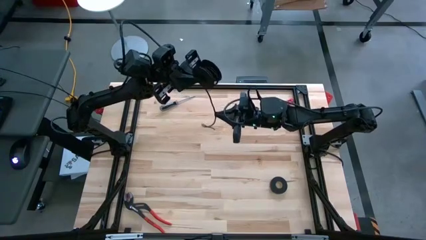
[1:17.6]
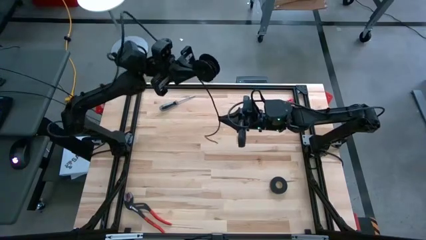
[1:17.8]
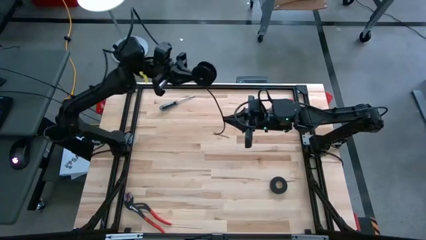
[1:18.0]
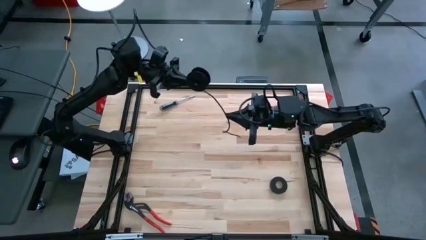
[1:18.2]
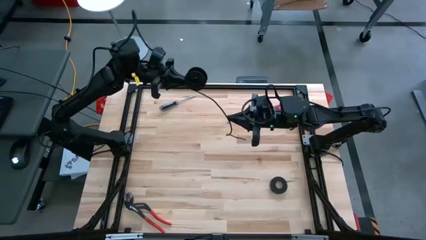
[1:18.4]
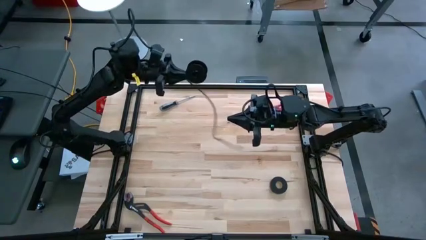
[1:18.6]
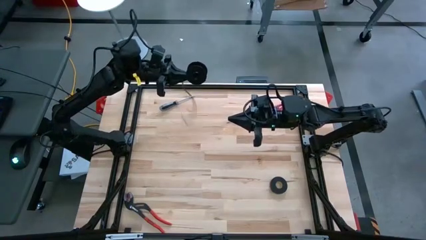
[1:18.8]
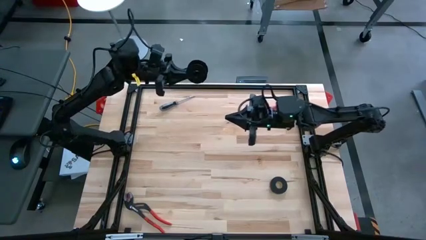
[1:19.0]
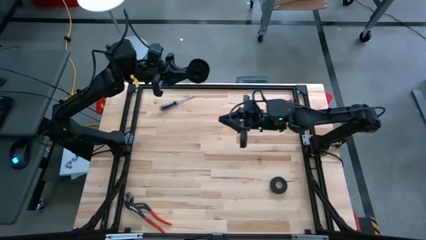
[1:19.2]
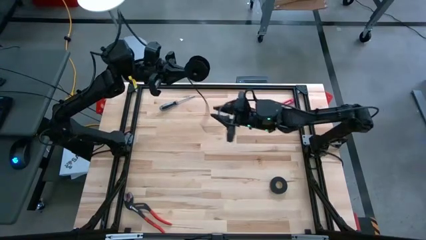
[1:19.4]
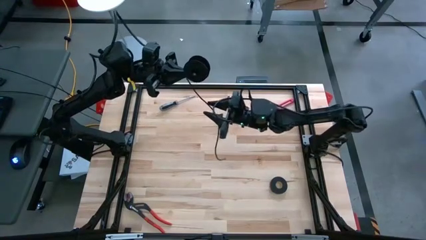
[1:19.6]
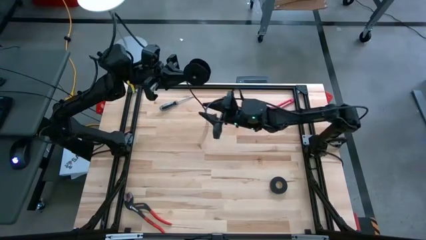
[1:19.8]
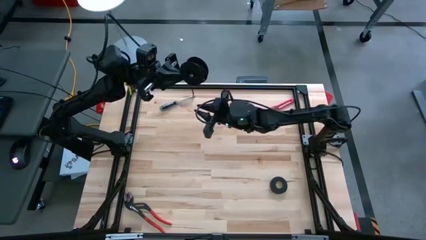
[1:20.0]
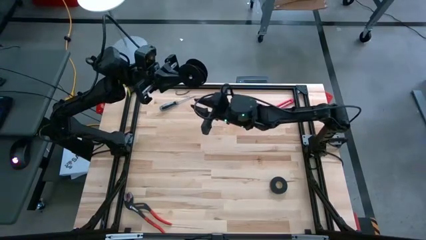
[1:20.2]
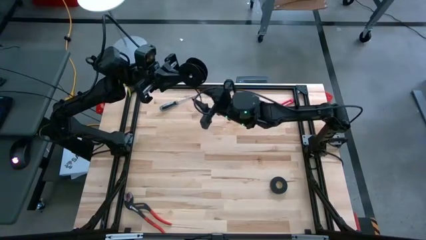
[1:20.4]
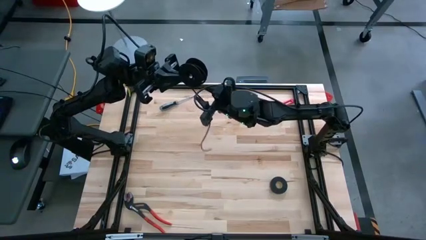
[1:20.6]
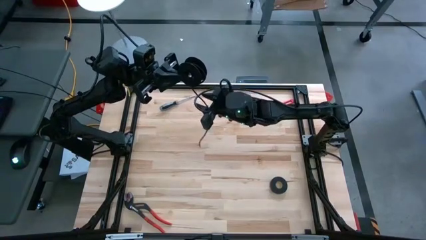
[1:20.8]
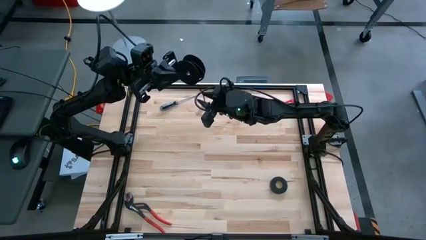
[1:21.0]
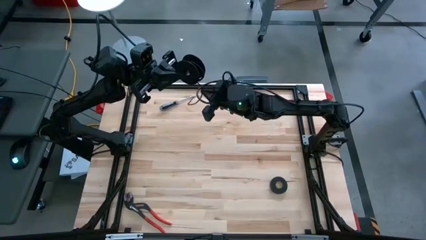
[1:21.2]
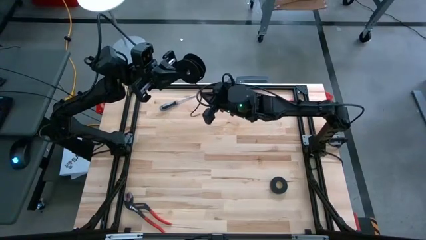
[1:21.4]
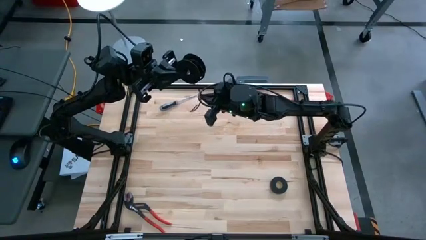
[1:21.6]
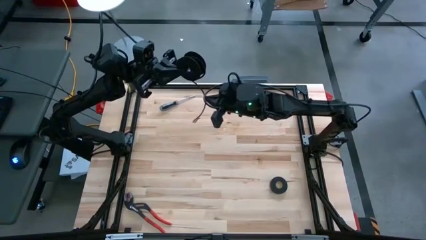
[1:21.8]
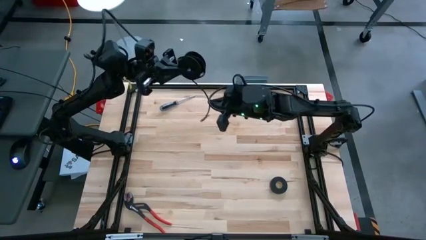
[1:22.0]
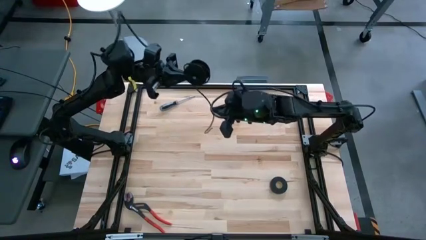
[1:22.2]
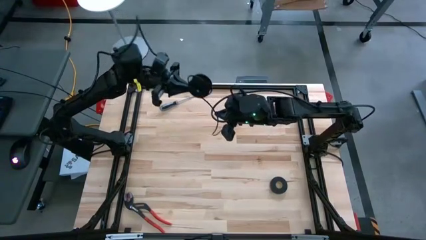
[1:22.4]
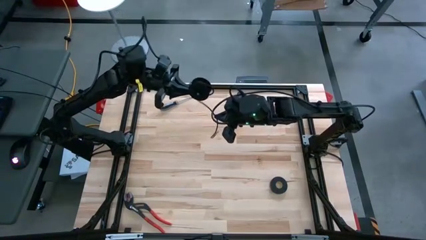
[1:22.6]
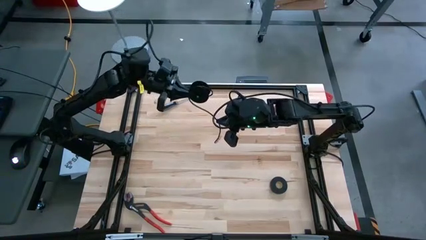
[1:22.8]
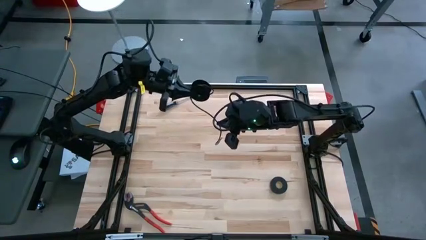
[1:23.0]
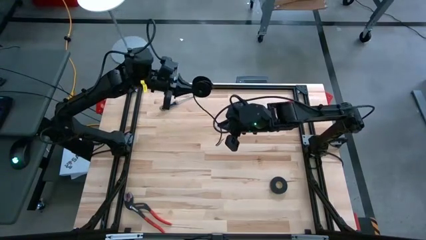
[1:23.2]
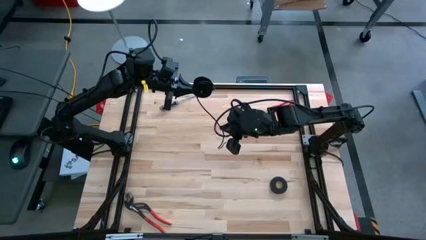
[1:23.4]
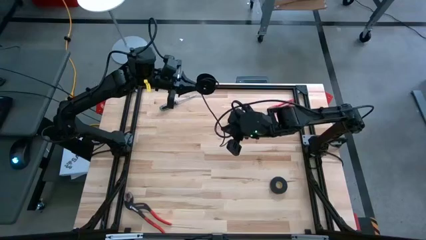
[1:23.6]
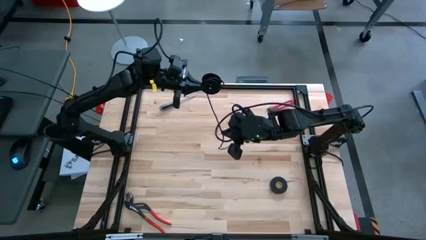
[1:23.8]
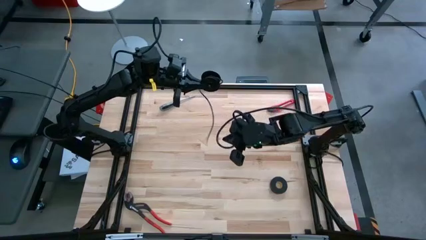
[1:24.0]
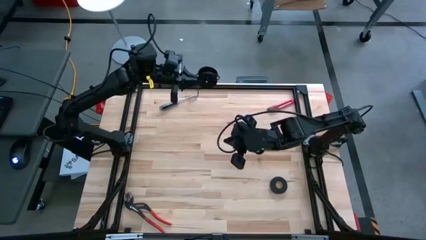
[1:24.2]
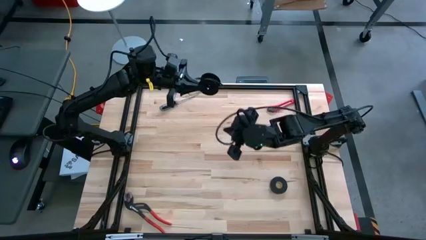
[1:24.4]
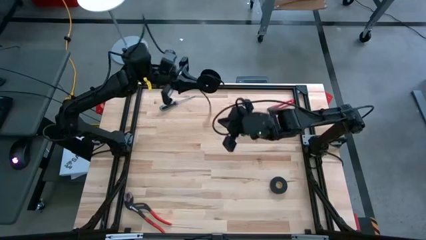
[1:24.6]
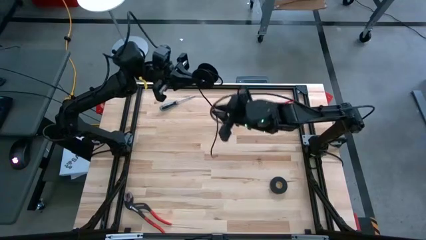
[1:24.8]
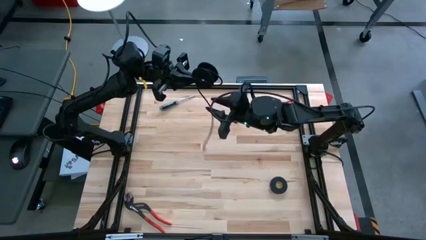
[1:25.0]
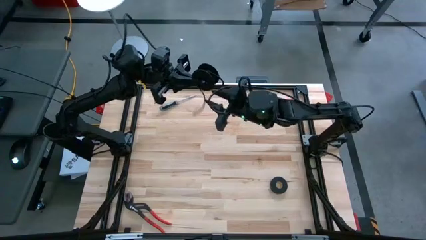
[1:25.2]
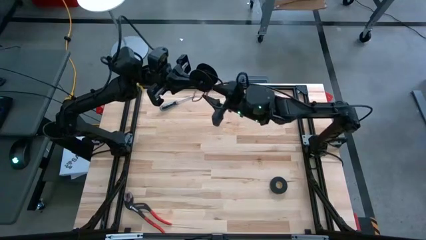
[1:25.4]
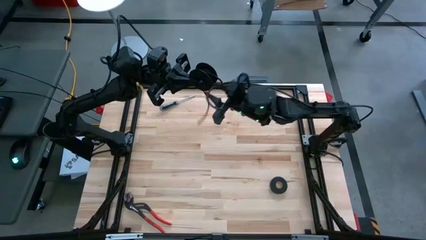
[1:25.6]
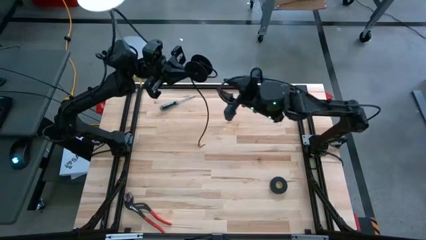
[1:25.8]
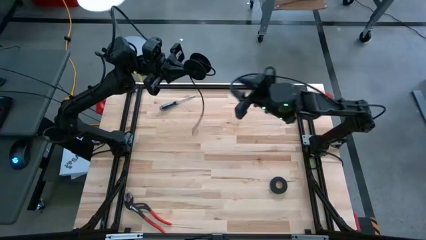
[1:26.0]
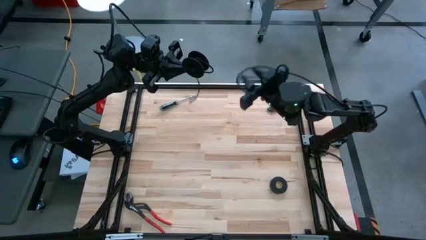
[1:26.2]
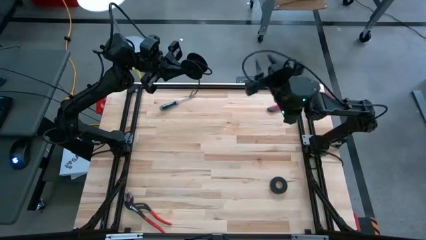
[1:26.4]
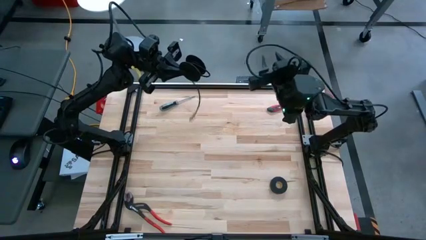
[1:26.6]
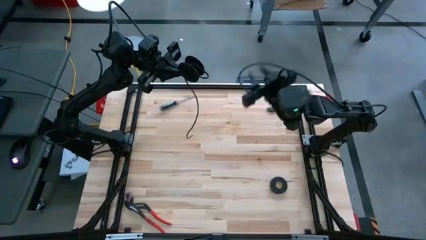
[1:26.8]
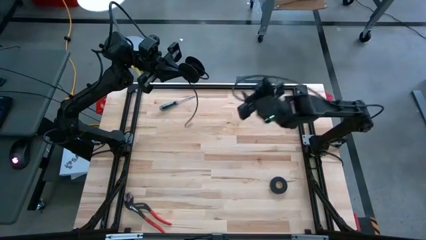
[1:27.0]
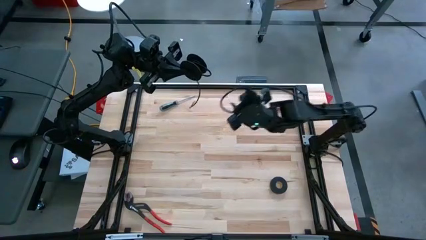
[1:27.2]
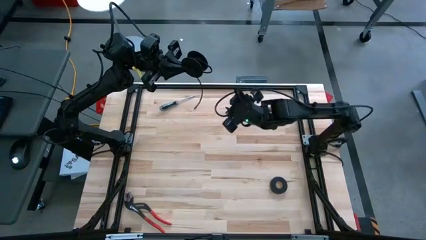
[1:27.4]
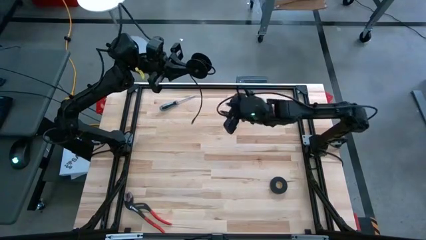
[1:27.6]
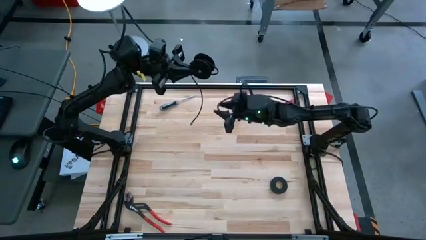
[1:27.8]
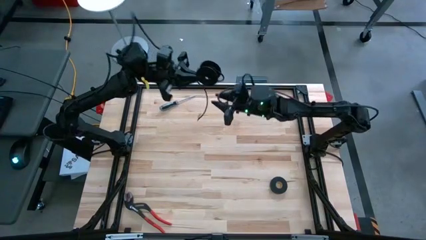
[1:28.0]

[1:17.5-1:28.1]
Task: Coil cords
Coil the black wire on the black spool

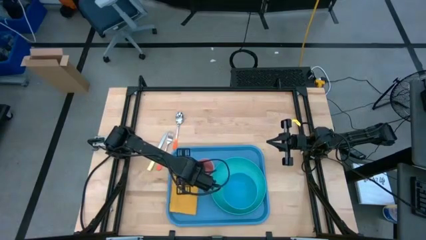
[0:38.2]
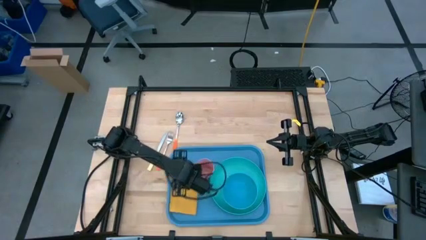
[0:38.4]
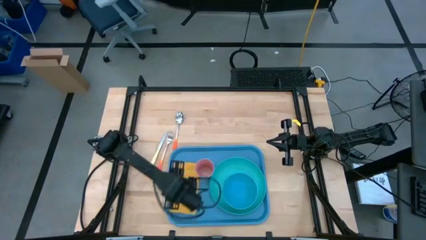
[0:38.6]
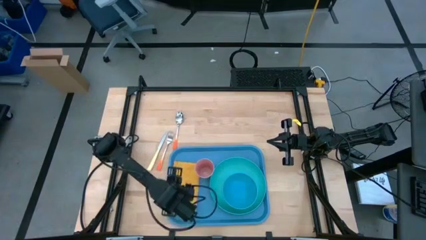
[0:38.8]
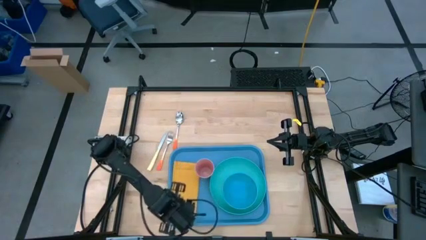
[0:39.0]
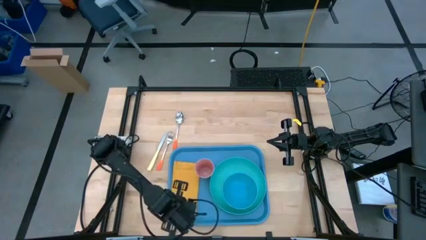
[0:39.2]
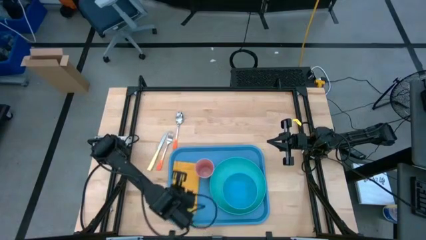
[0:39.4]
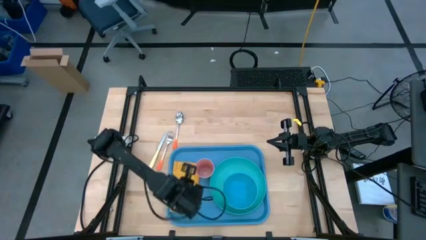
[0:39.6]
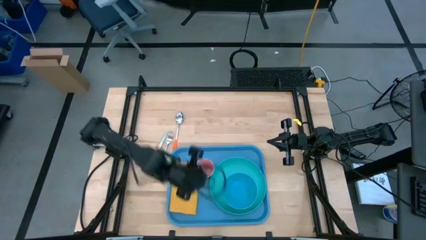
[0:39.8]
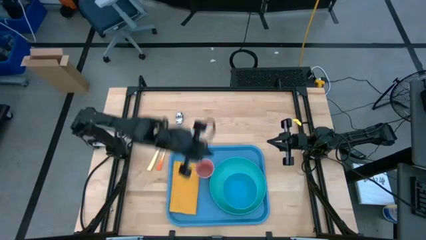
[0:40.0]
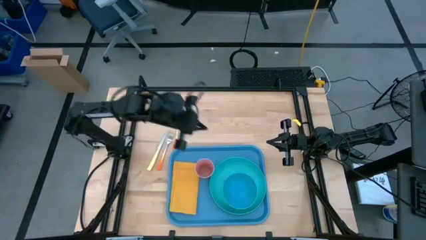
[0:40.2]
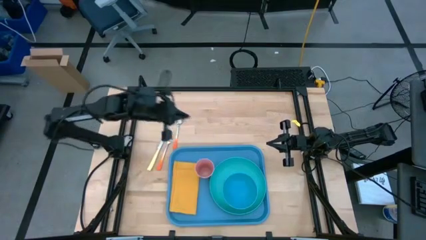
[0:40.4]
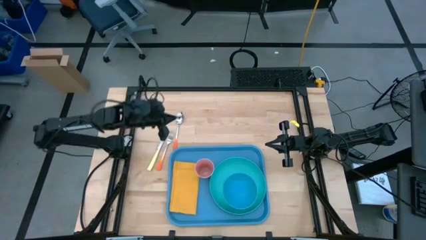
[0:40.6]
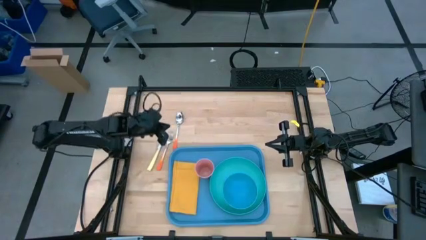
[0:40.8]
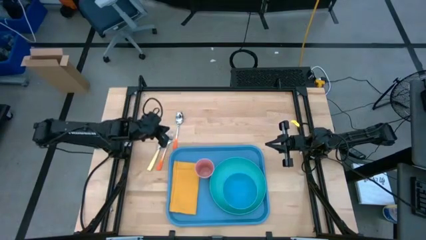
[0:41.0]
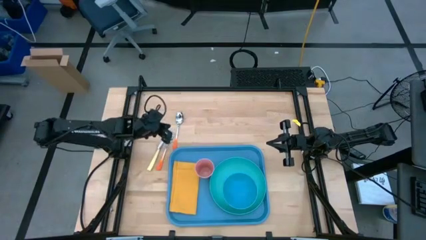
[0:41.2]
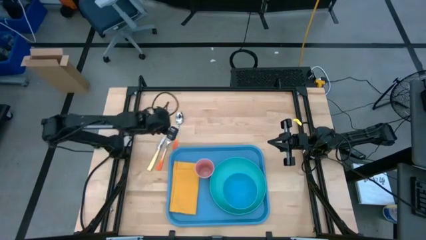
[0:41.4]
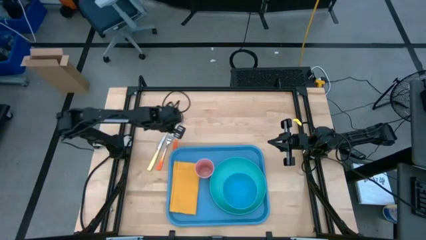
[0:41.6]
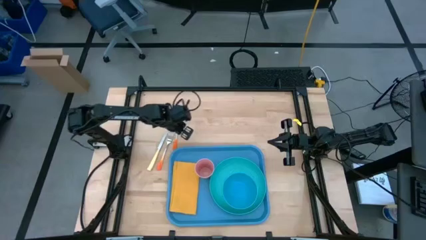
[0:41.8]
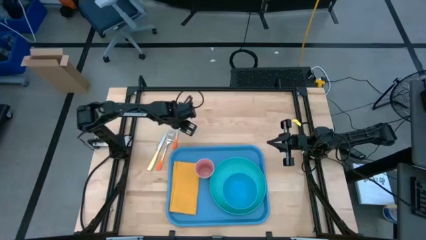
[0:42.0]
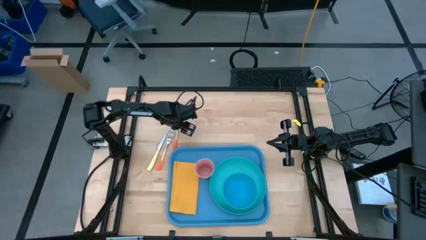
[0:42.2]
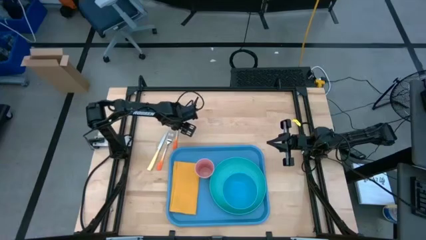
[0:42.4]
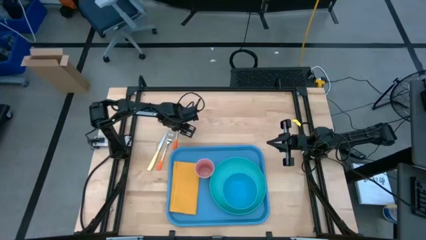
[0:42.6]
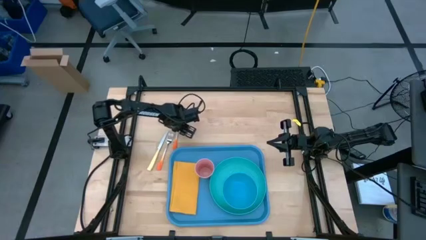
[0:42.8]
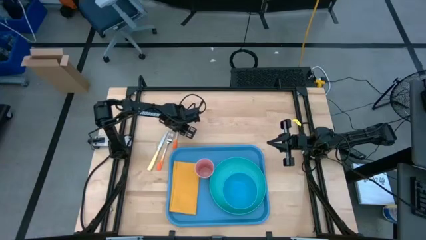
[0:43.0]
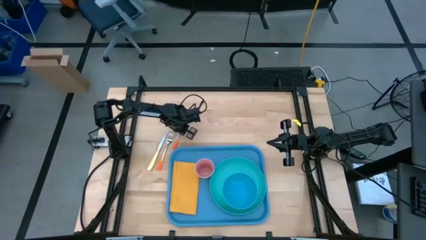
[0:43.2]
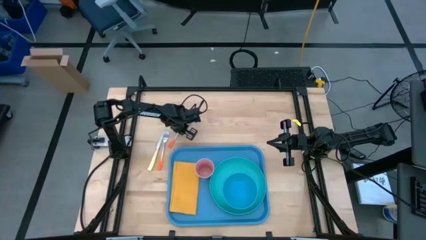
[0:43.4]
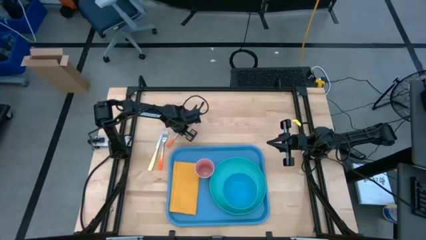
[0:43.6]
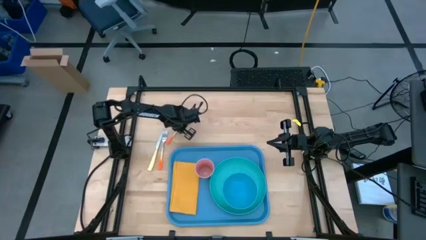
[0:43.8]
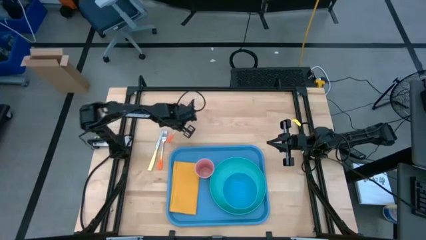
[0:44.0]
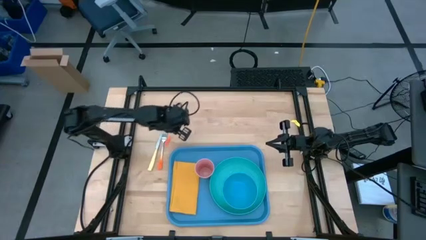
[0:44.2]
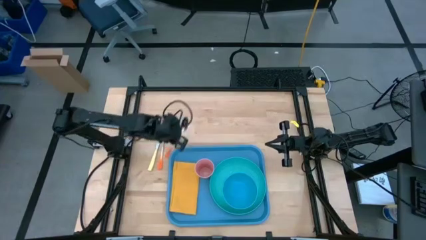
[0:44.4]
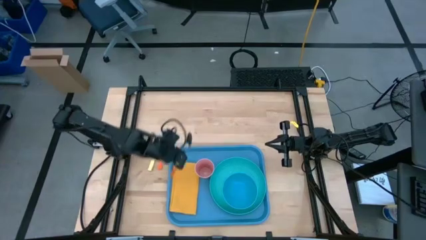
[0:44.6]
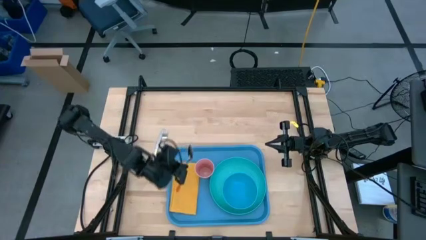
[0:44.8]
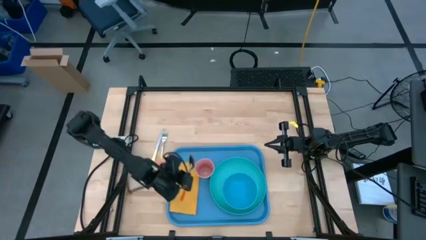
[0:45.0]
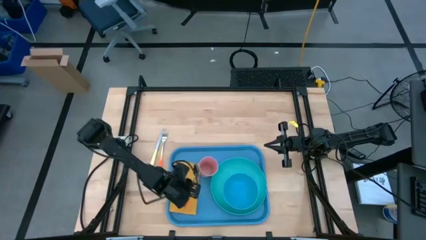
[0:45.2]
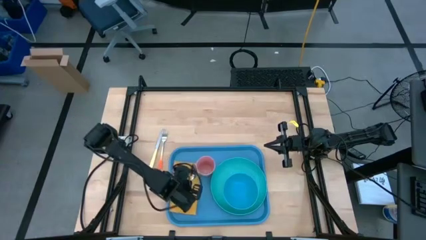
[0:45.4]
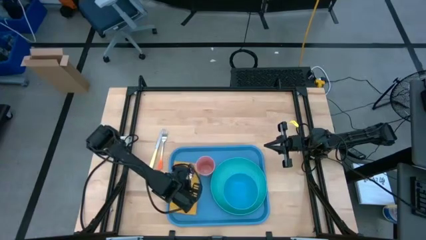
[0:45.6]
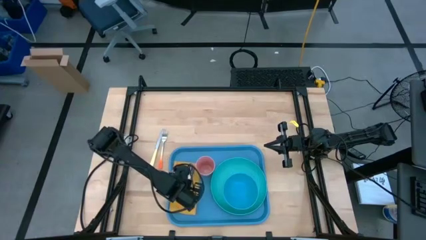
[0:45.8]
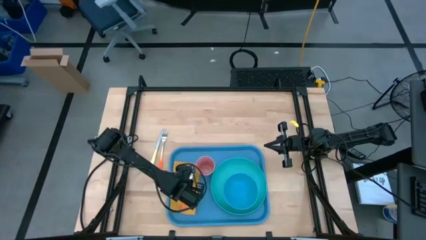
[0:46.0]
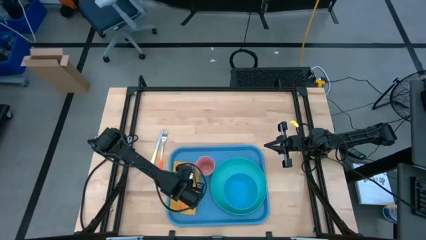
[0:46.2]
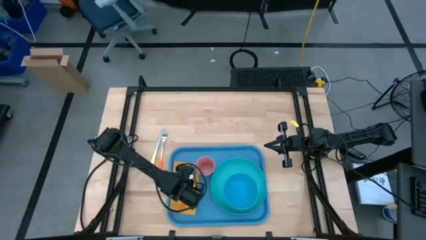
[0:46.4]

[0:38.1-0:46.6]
Task: Set up tray
Put the orange spoon on top of the yellow table napkin on the blue serving tray
